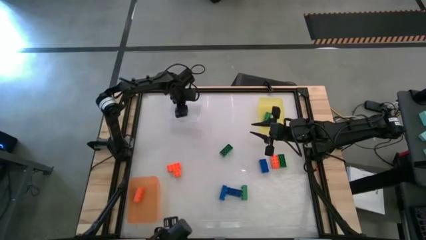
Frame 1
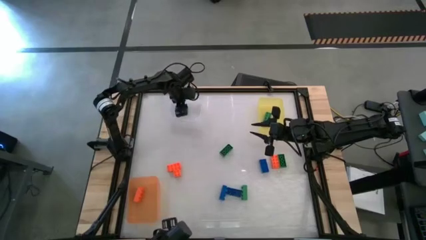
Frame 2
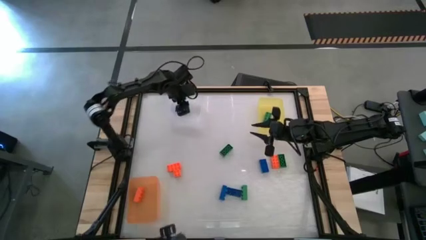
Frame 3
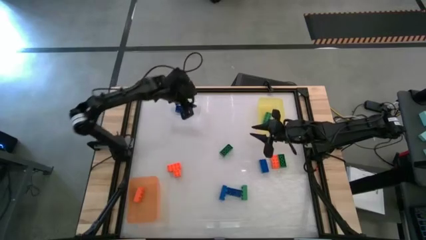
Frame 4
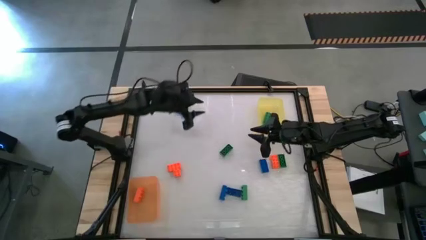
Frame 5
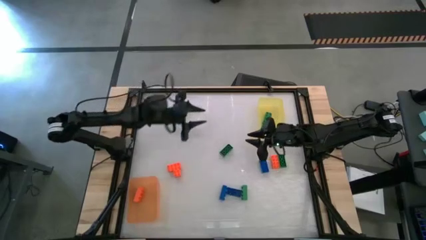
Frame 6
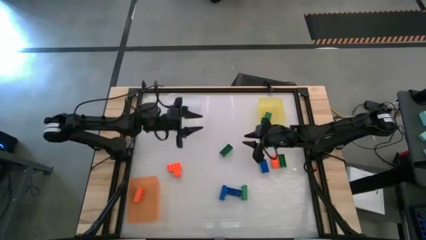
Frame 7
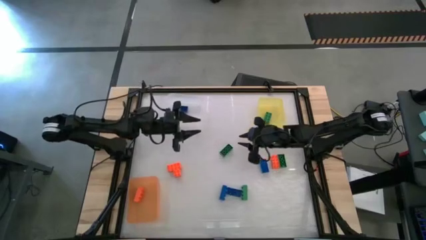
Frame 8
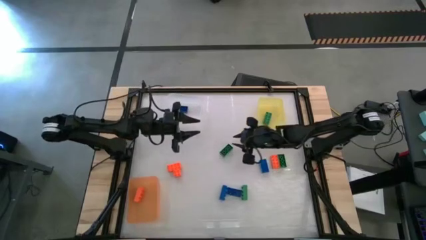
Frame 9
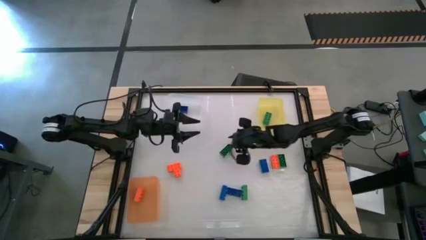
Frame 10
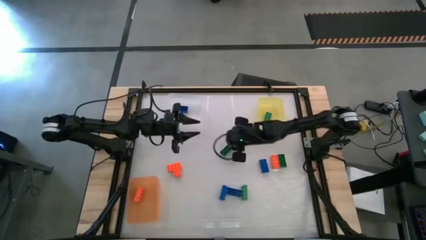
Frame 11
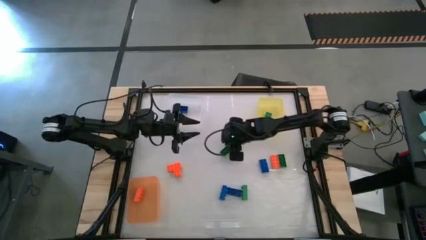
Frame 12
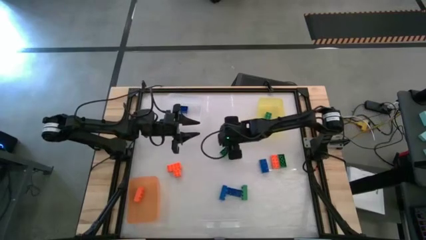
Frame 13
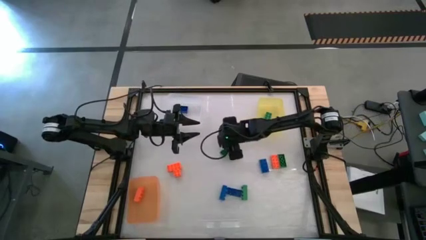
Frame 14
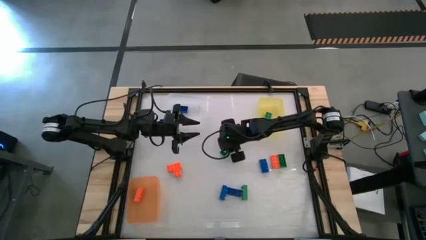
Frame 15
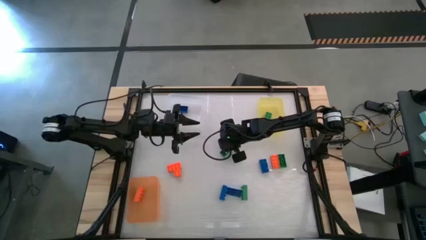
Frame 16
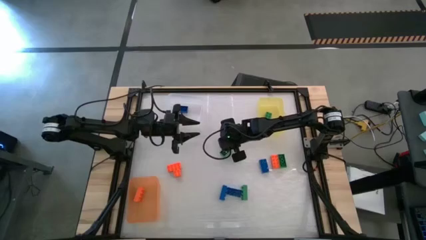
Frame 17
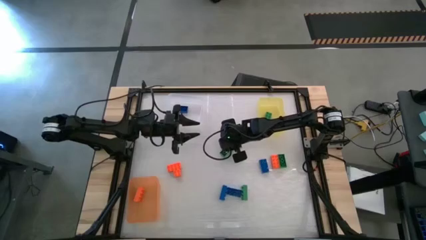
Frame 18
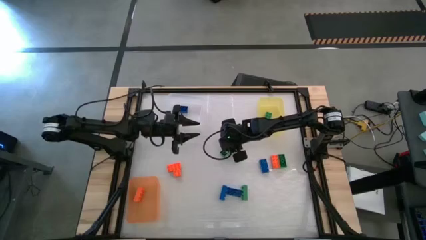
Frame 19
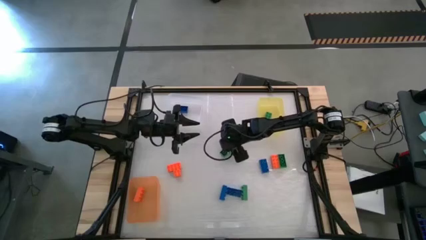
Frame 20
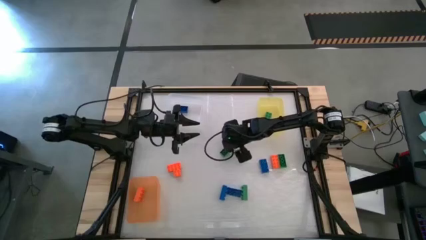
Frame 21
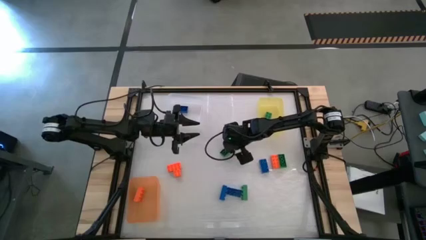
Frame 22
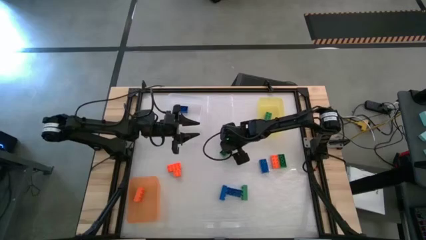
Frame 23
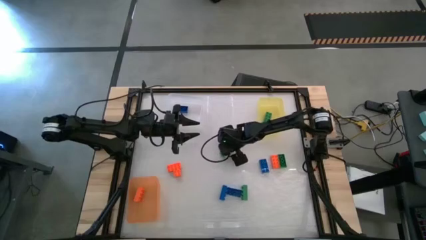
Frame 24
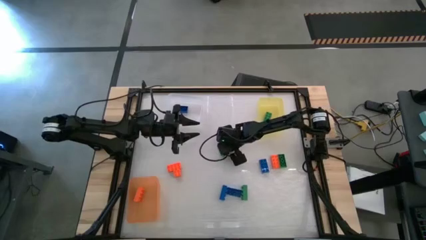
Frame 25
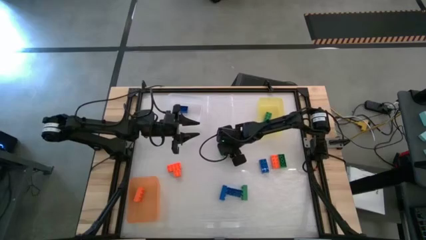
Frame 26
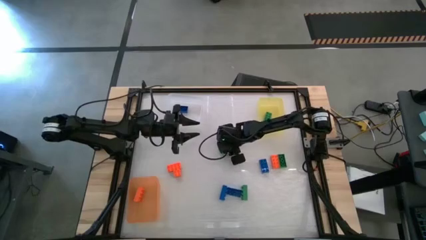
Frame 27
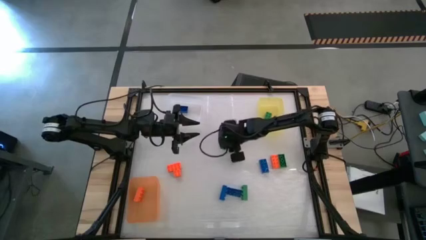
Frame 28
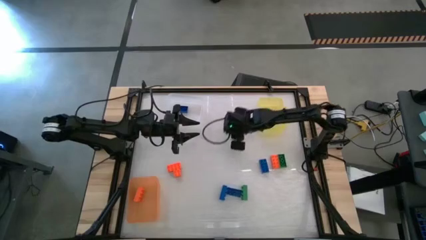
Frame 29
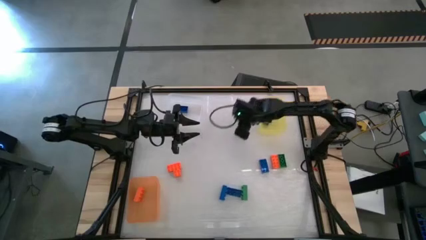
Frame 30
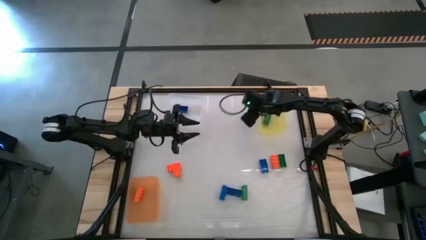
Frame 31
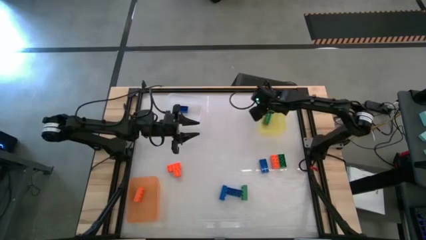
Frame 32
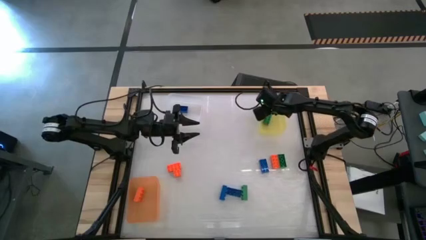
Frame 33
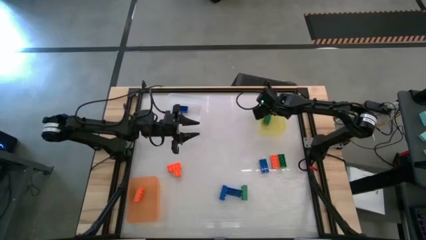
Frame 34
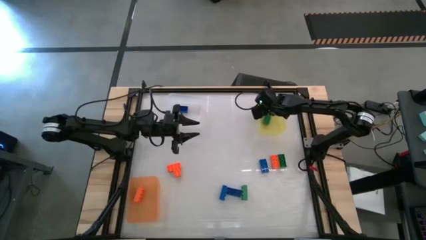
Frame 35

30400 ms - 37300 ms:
Task: Sort & place blocks by color
Put the green game piece into the yellow bin

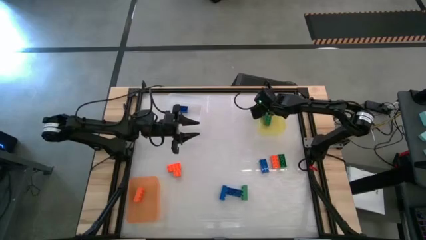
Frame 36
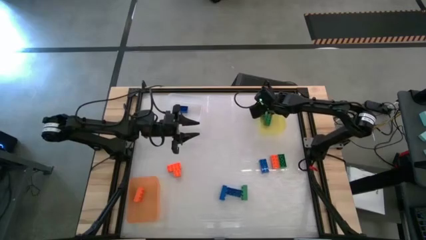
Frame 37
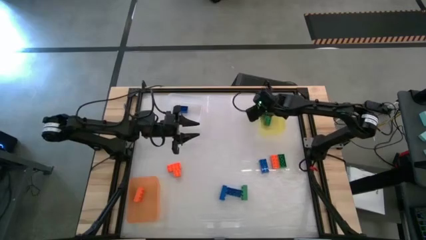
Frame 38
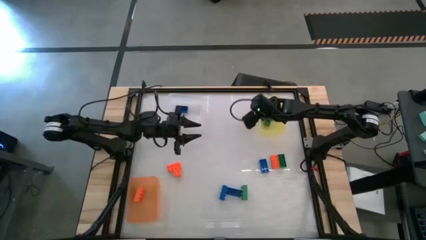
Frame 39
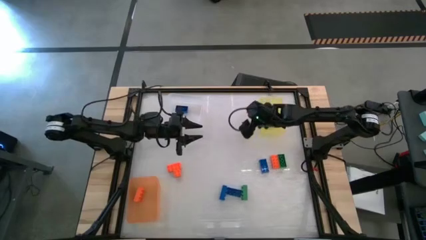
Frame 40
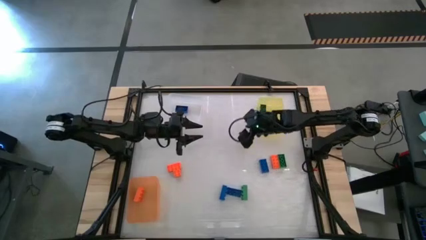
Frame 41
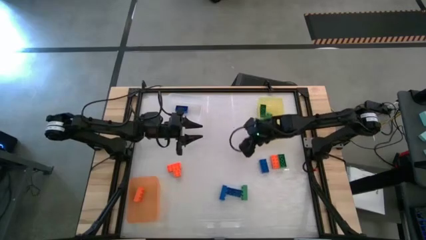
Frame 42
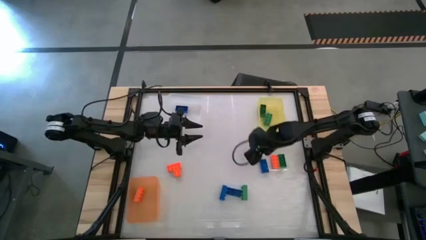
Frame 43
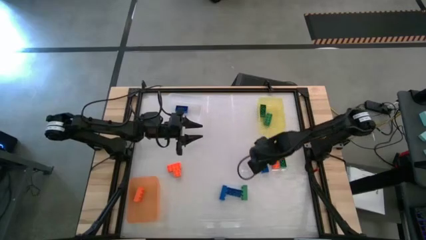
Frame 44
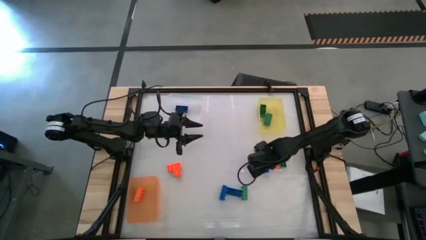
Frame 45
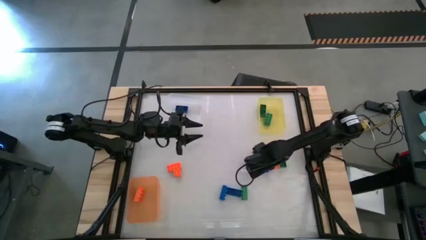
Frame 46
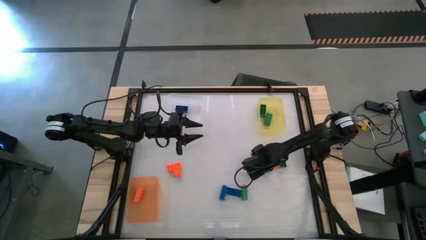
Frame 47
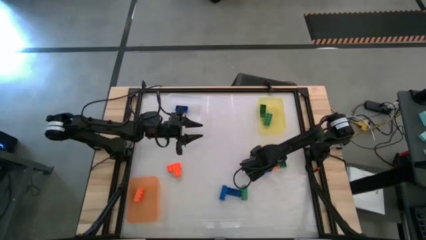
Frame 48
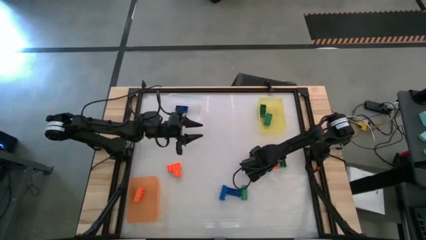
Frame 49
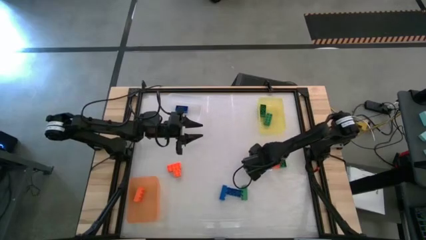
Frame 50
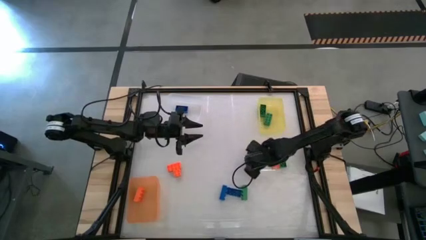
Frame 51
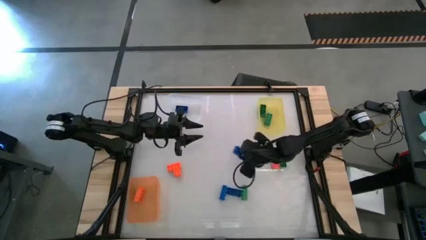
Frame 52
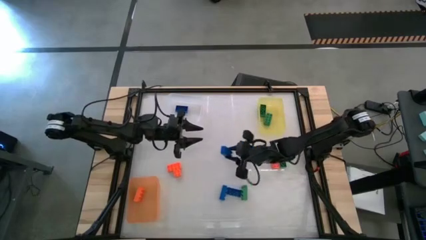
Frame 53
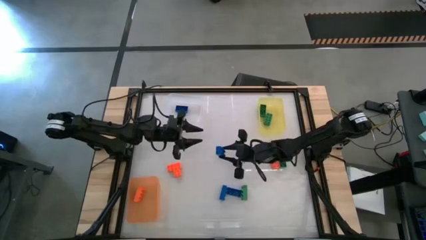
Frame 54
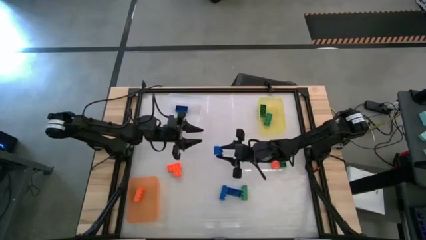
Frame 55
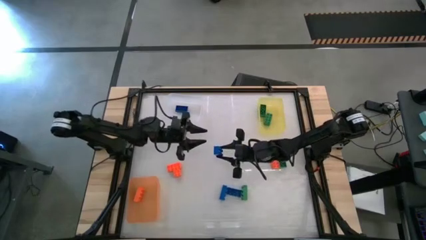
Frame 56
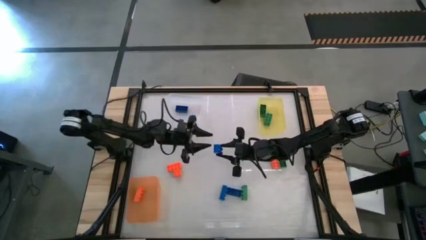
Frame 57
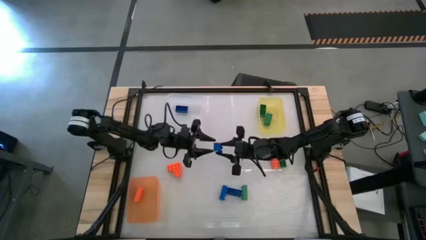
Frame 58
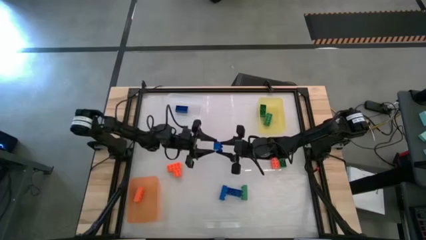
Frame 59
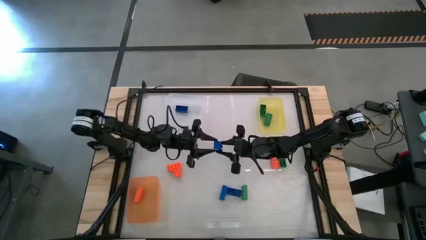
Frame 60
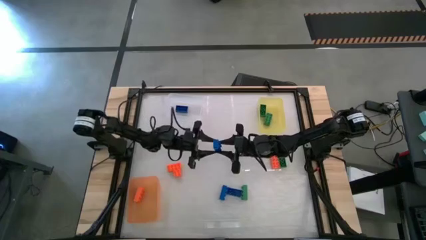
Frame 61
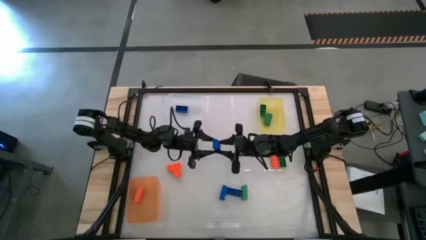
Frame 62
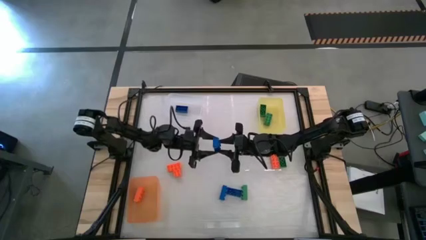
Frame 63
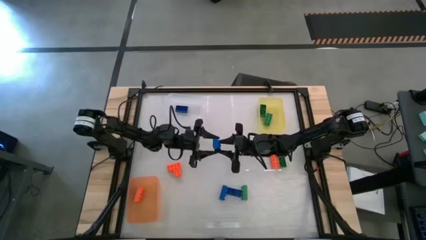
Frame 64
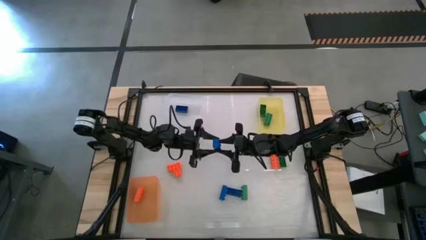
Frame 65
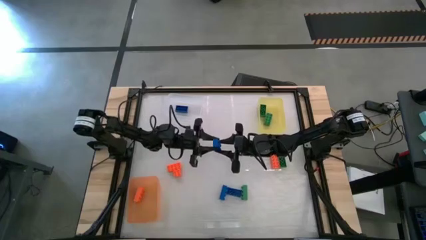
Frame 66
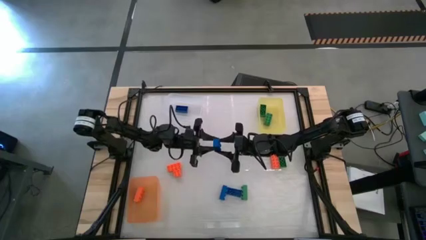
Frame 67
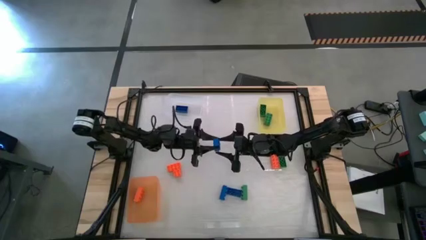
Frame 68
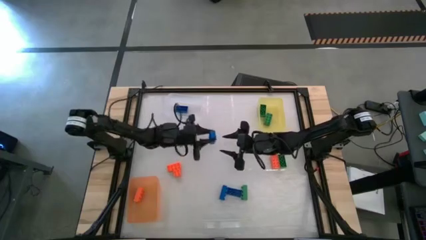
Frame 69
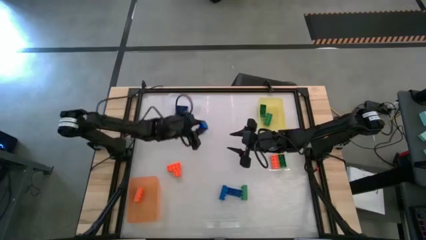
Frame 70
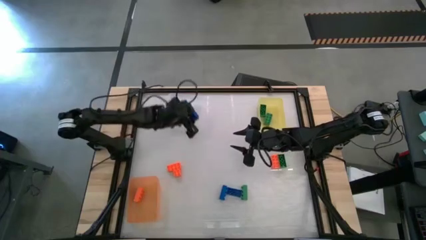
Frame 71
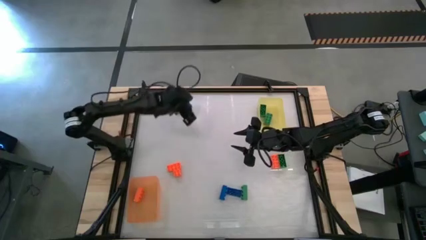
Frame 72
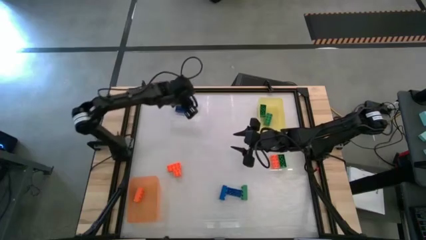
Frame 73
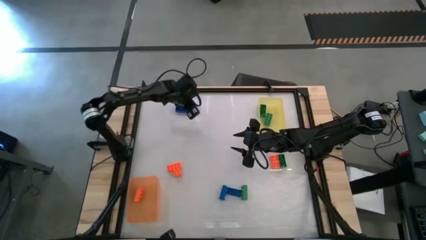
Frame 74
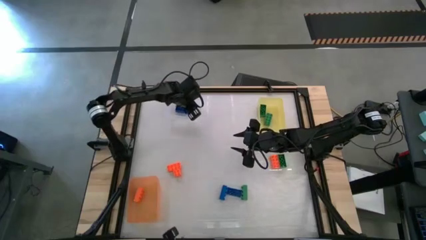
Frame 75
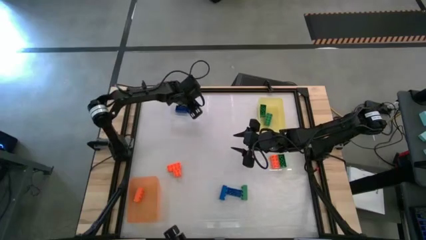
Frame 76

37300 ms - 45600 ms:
Put the blue game piece into the transparent bin
